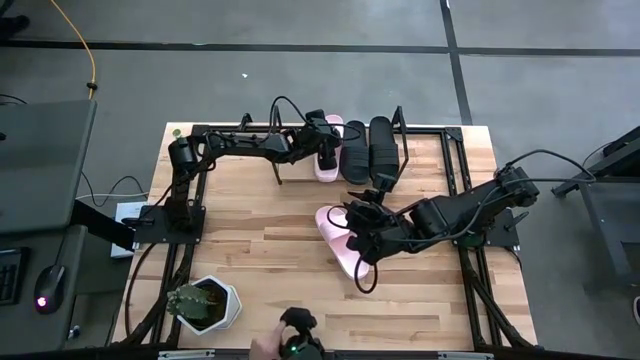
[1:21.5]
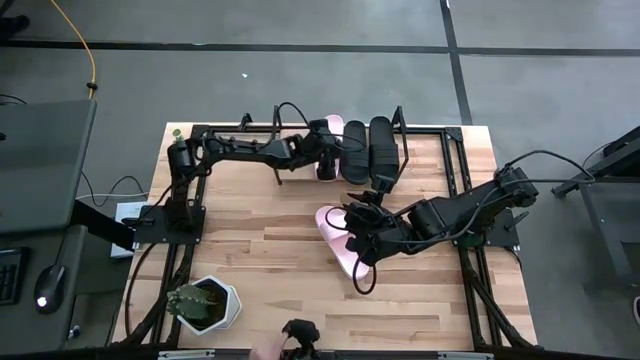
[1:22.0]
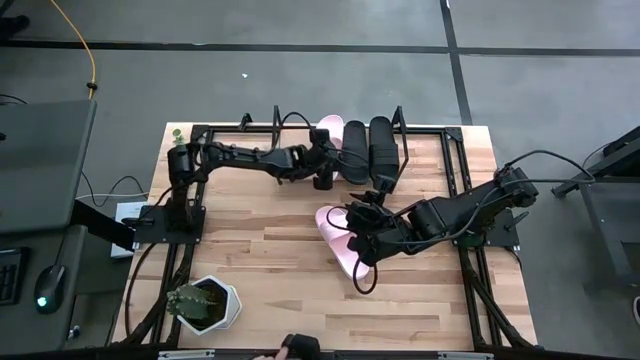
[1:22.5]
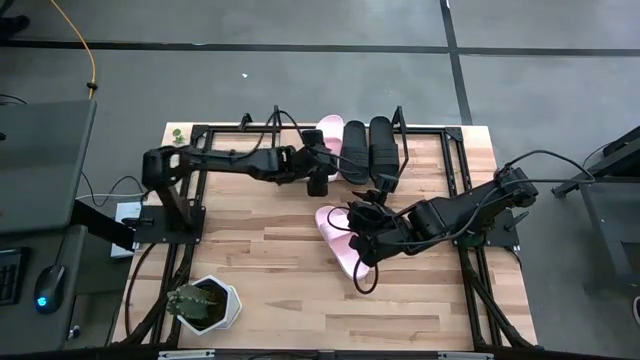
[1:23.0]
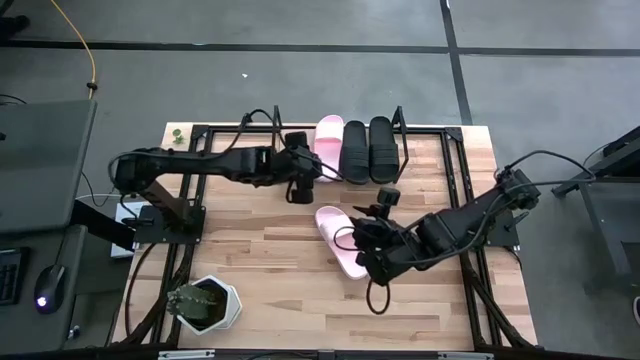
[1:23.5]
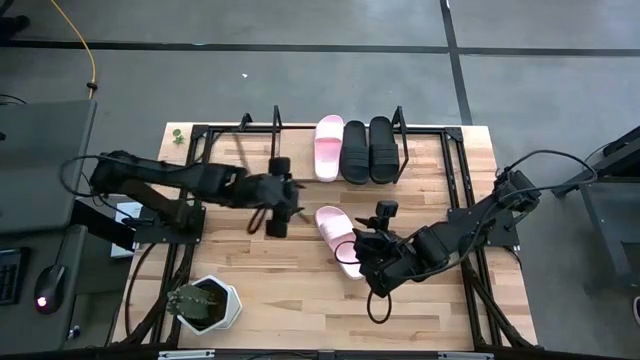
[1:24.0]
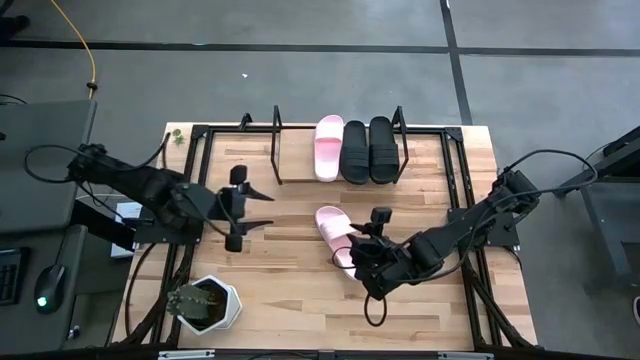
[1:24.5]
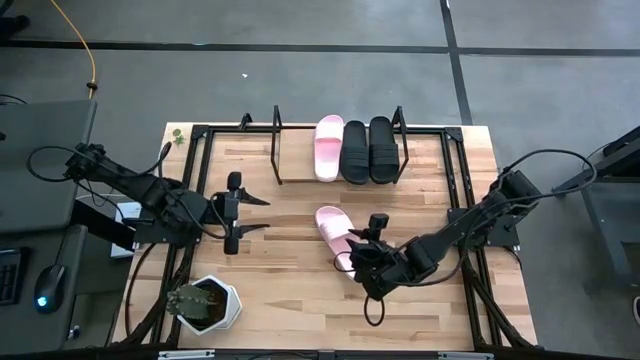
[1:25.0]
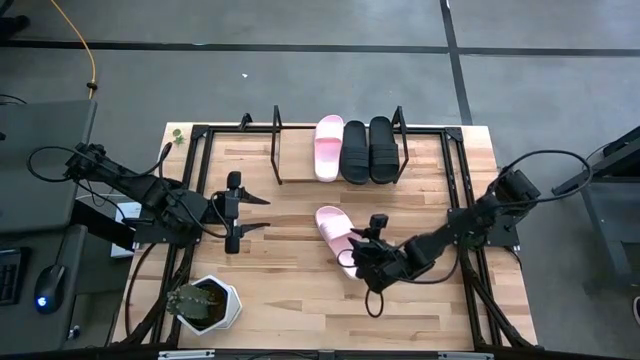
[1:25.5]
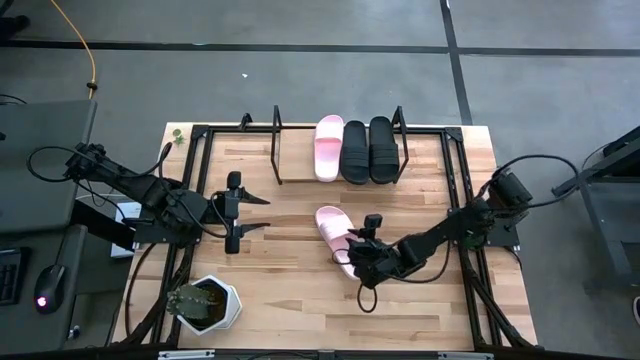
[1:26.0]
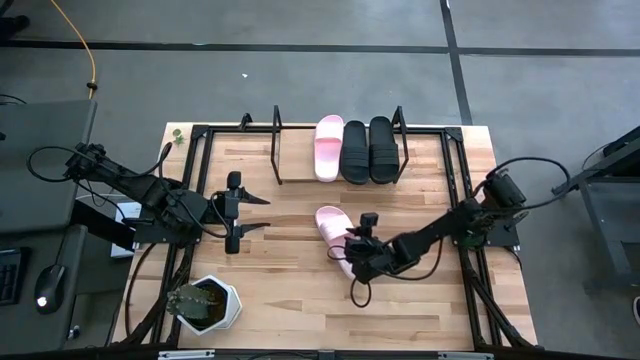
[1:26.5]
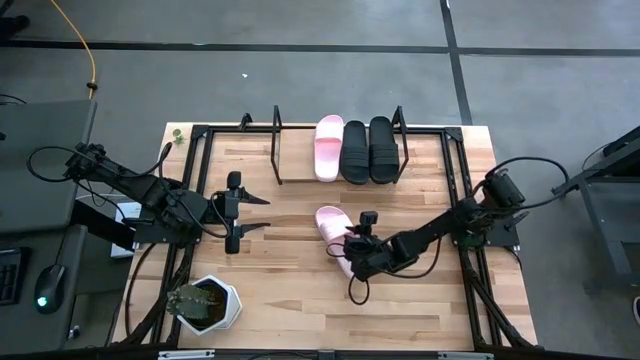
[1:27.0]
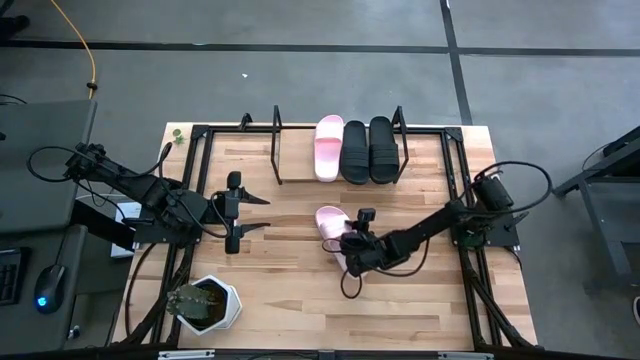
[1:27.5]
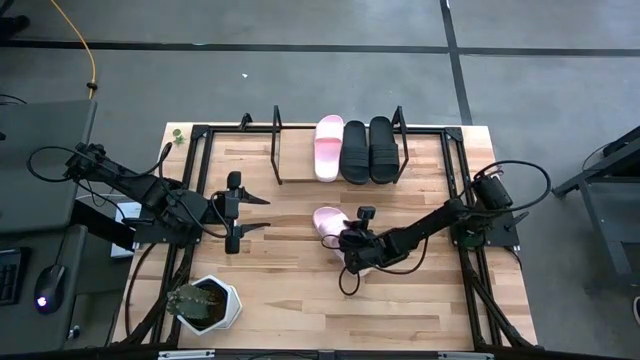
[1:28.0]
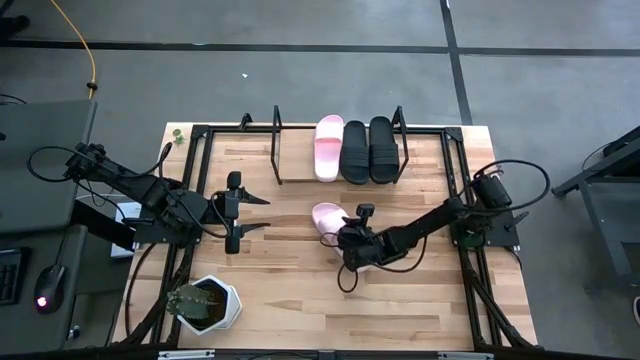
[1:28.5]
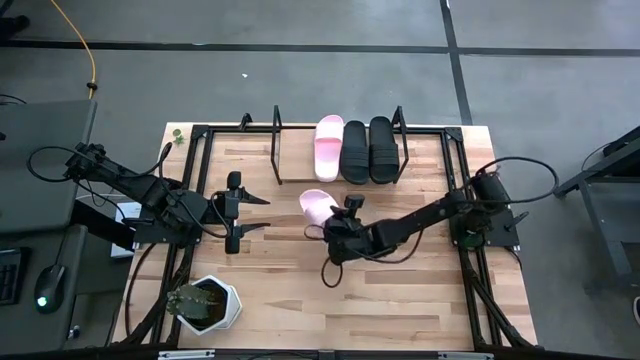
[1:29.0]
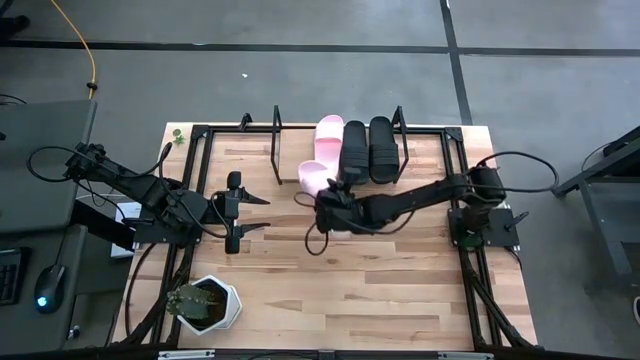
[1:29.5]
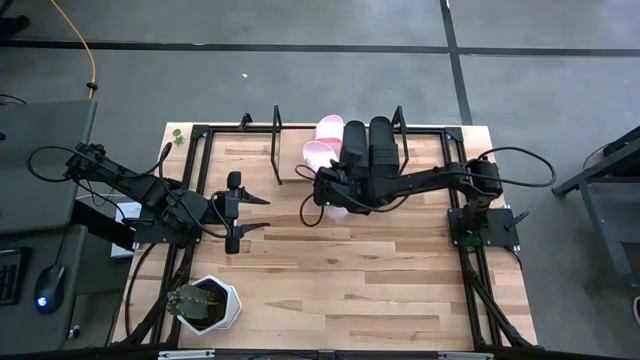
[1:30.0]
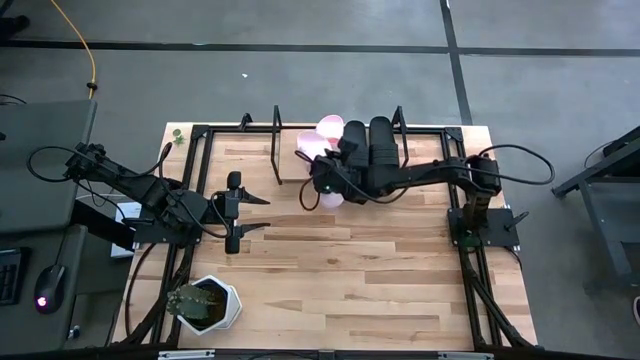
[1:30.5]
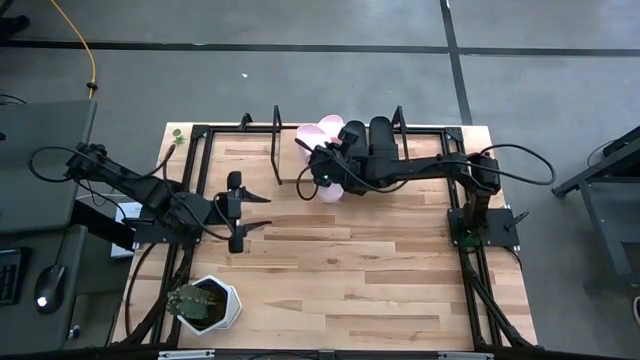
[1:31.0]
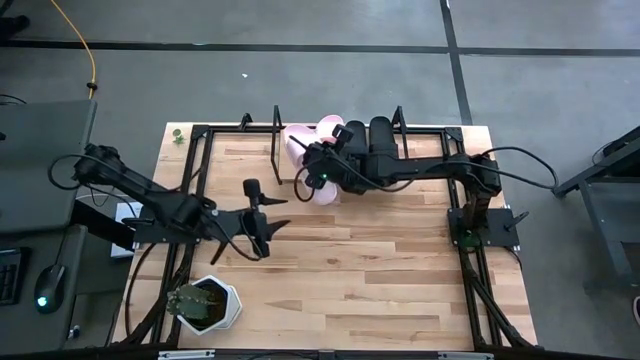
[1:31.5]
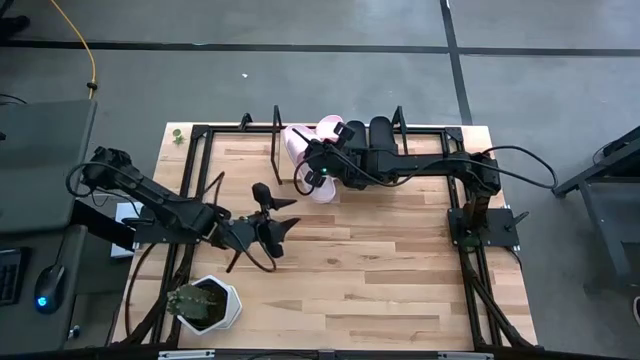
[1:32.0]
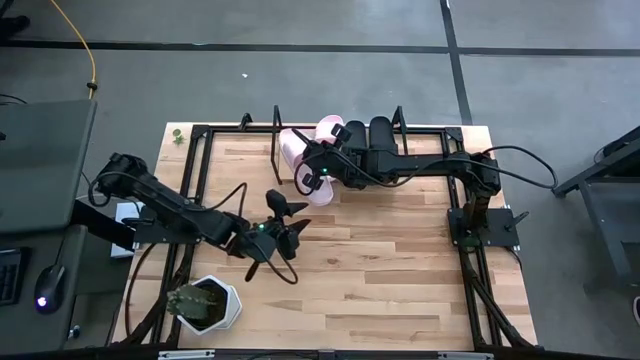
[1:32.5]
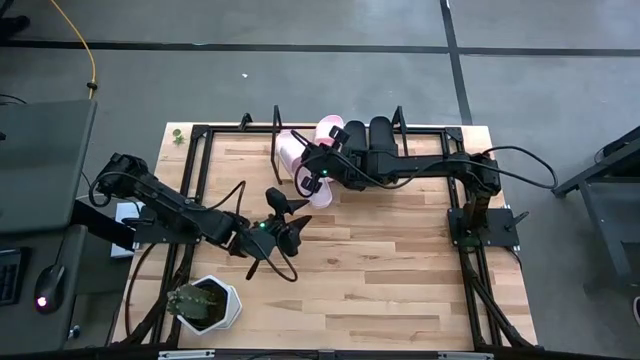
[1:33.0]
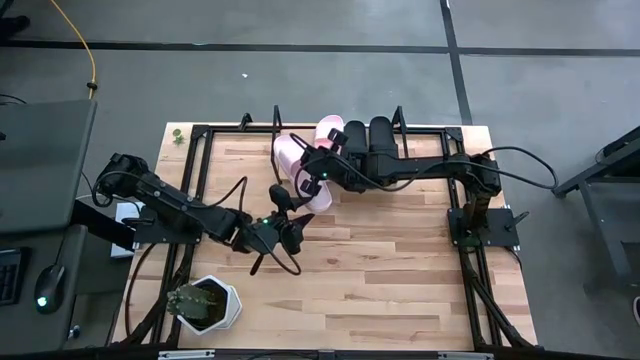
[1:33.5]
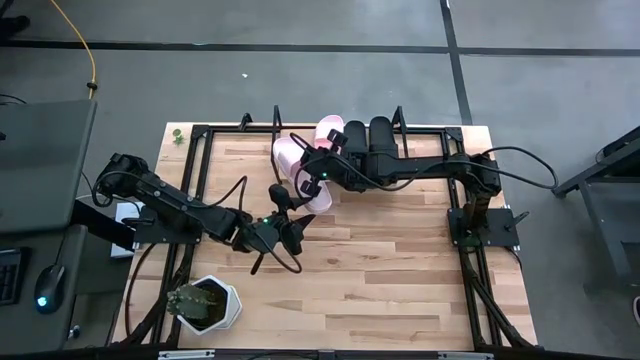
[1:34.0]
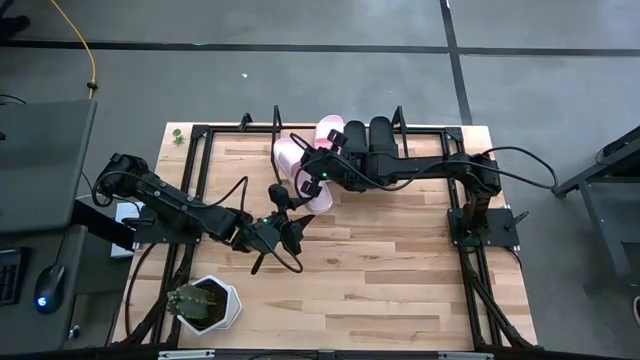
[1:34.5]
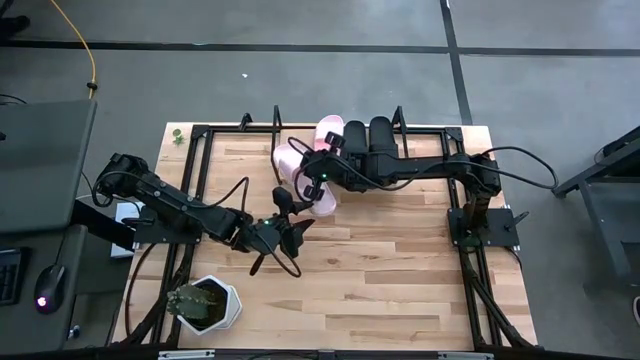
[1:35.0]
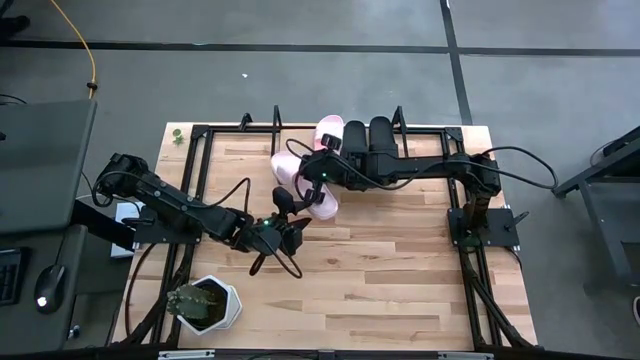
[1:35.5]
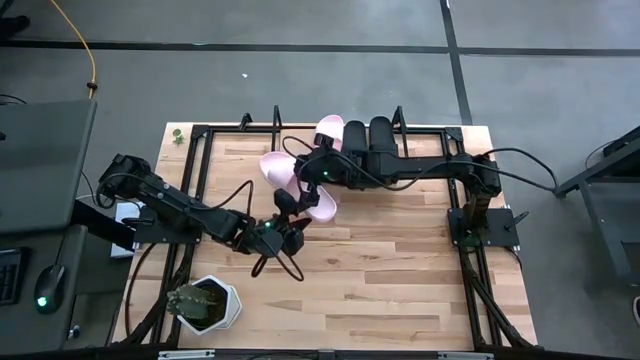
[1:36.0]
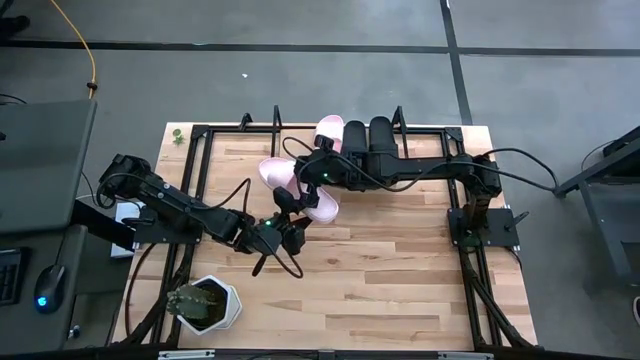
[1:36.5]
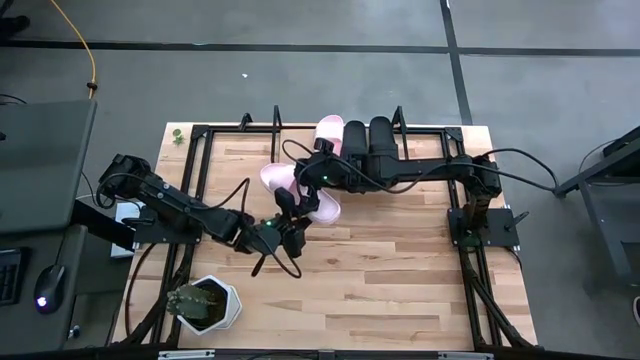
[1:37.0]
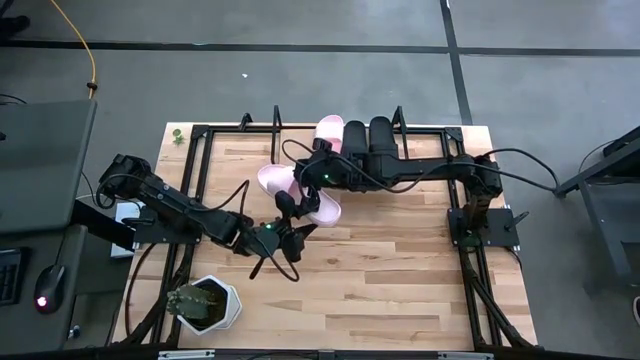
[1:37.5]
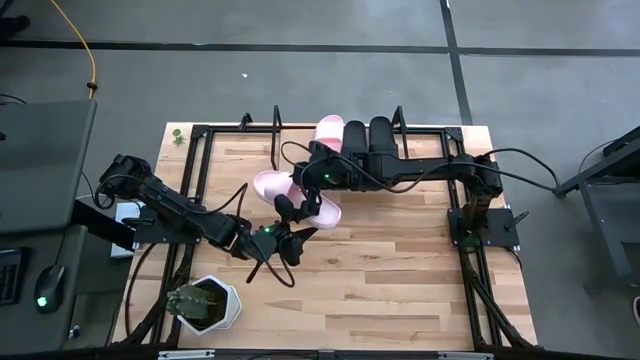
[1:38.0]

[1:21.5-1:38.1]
Task: Pick and place slides into the shelf
Put the pink slide on the shelf

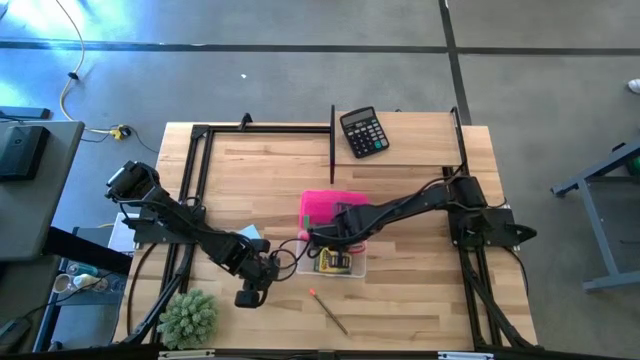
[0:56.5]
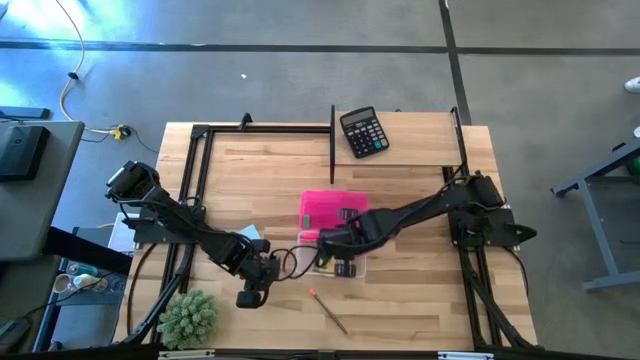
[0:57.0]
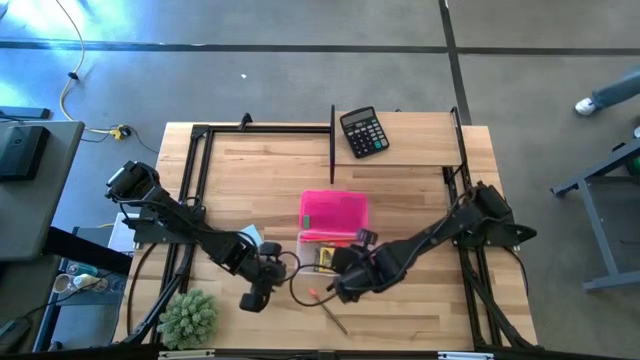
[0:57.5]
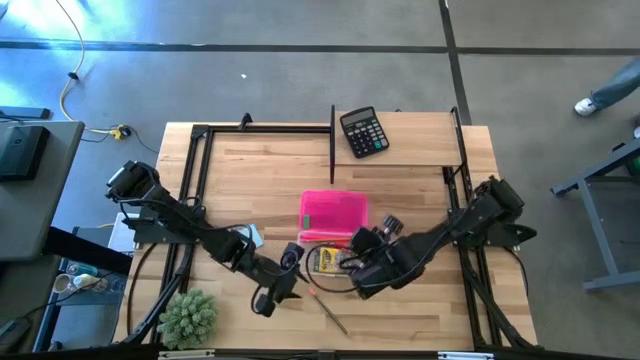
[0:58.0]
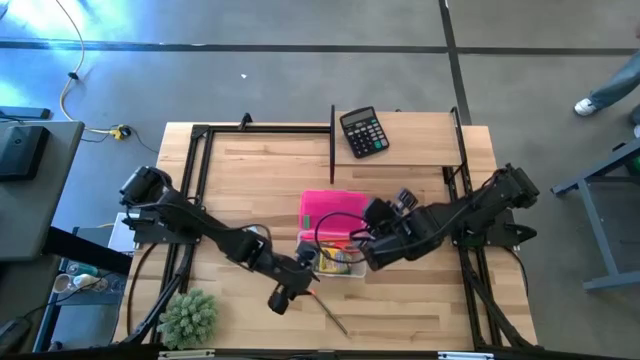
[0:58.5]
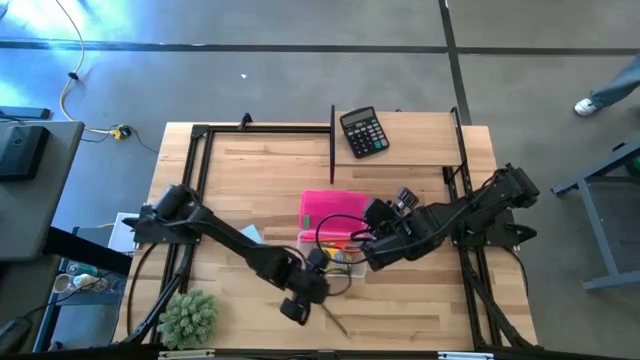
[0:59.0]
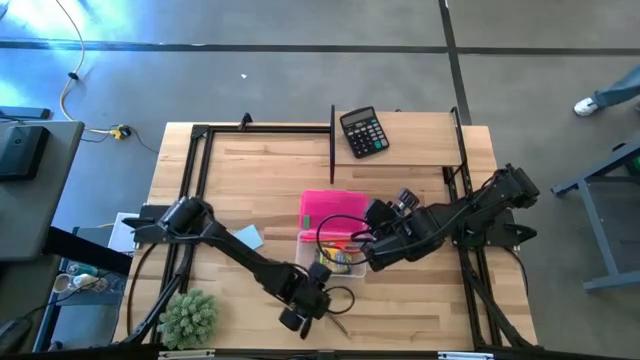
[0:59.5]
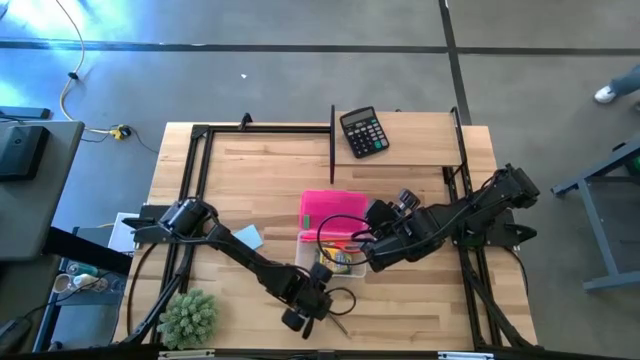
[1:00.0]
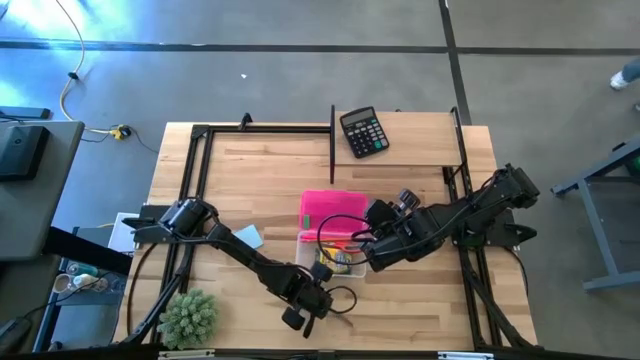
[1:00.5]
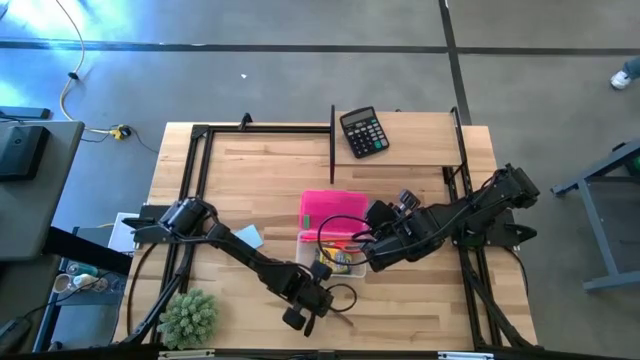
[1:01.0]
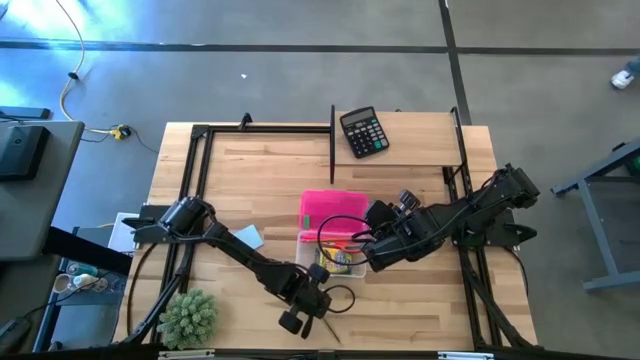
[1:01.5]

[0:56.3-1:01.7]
Task: Pack school essentials
Put the black pencil into the pink supply box
